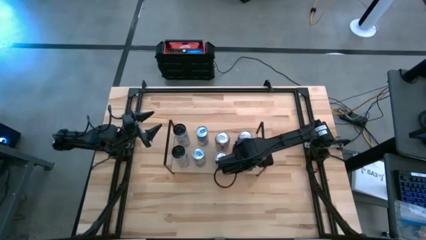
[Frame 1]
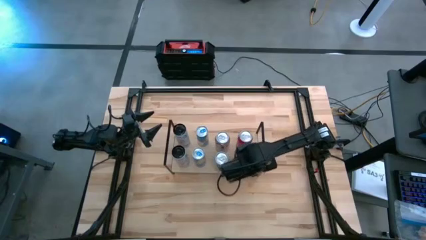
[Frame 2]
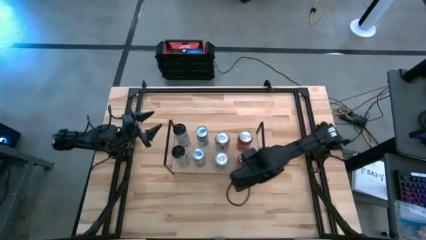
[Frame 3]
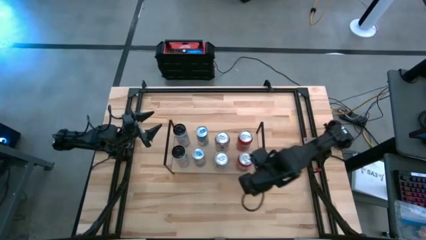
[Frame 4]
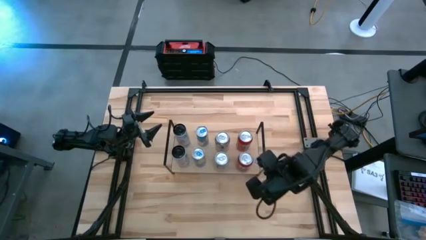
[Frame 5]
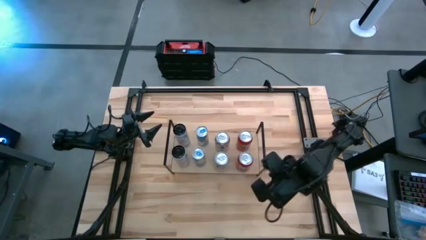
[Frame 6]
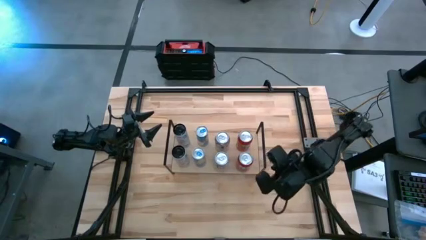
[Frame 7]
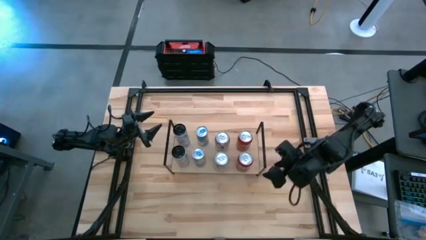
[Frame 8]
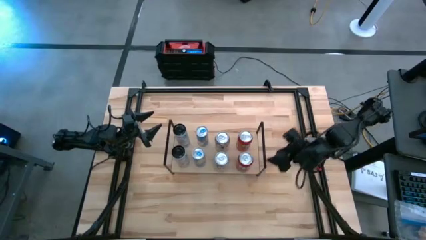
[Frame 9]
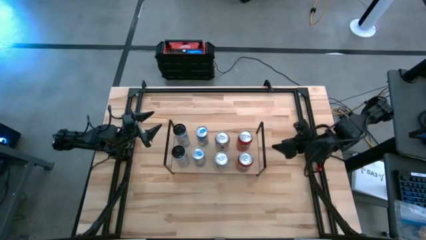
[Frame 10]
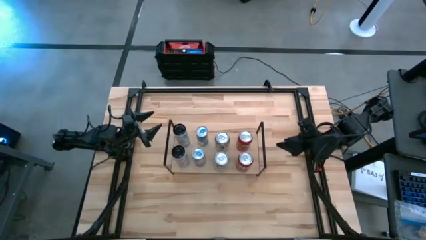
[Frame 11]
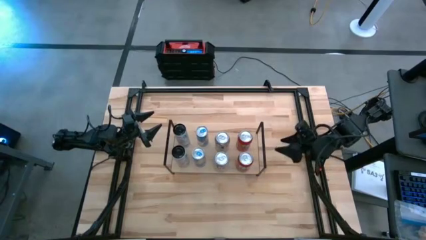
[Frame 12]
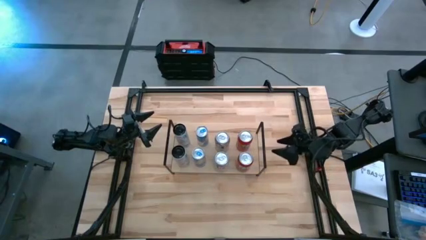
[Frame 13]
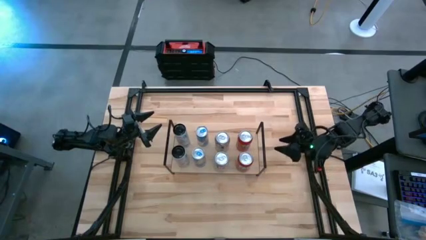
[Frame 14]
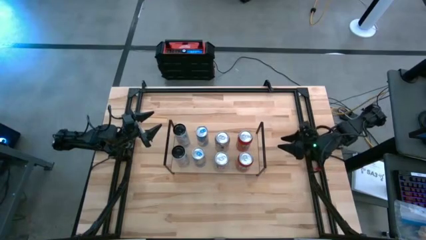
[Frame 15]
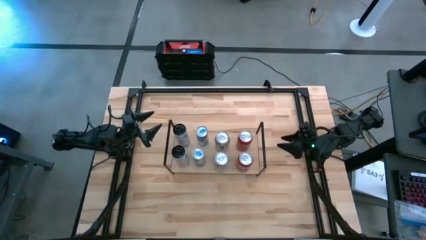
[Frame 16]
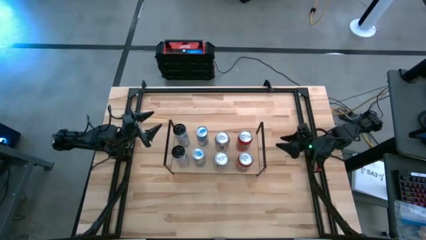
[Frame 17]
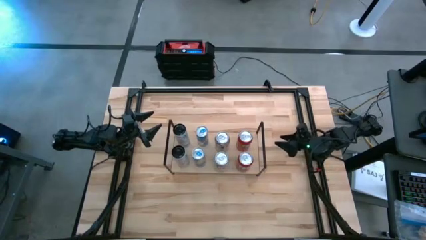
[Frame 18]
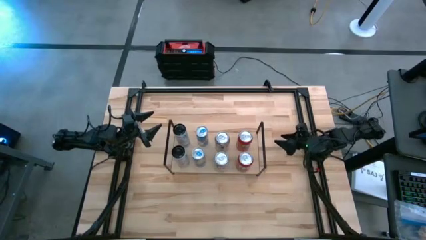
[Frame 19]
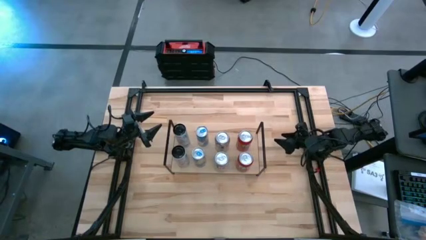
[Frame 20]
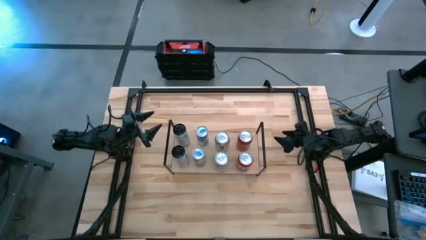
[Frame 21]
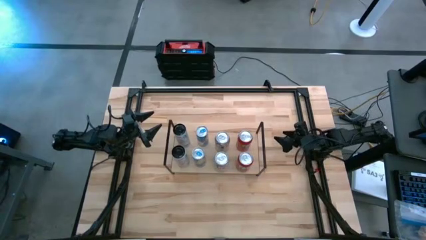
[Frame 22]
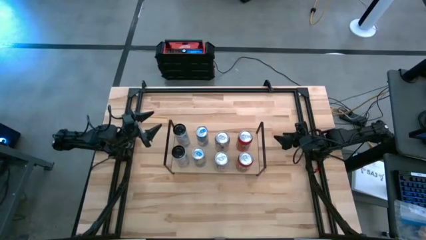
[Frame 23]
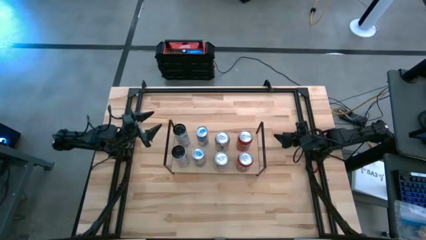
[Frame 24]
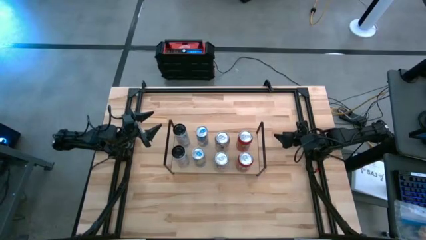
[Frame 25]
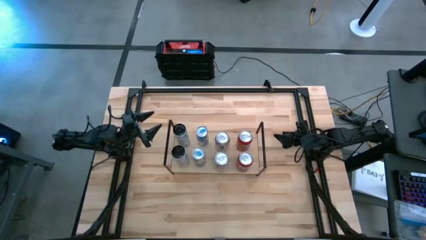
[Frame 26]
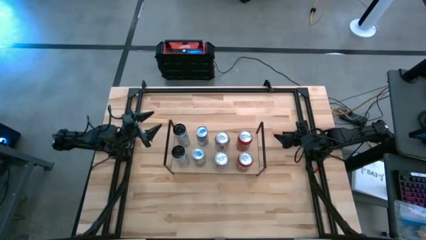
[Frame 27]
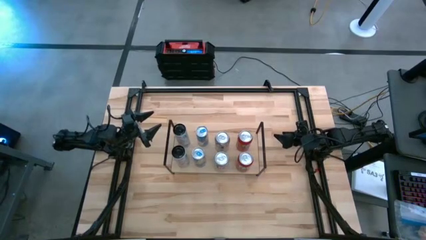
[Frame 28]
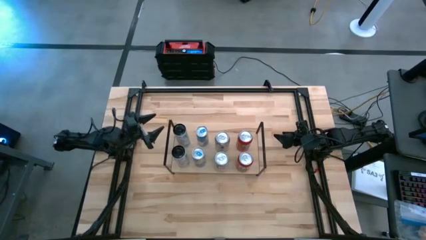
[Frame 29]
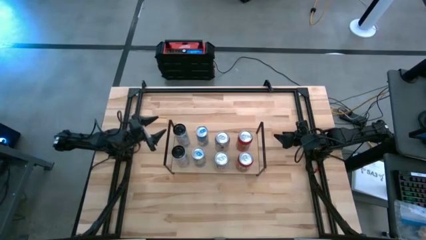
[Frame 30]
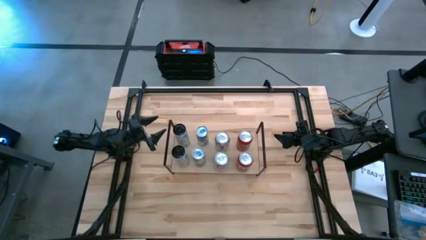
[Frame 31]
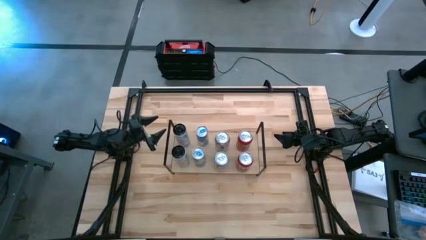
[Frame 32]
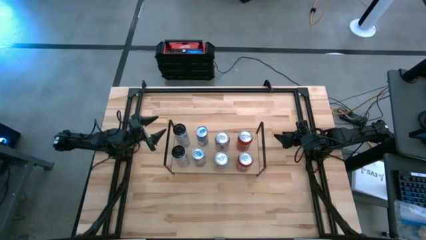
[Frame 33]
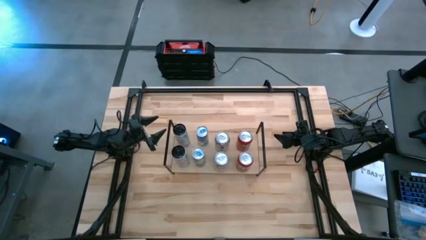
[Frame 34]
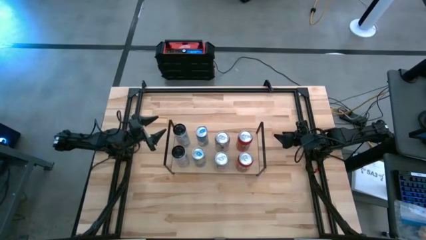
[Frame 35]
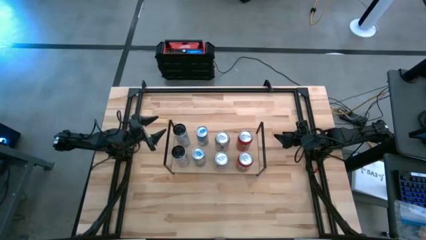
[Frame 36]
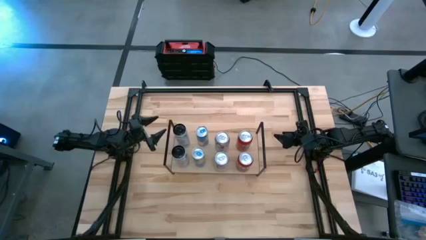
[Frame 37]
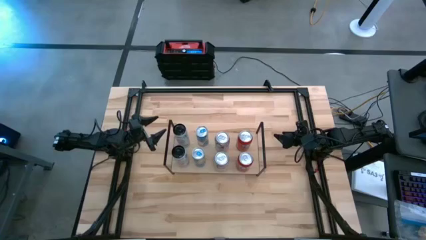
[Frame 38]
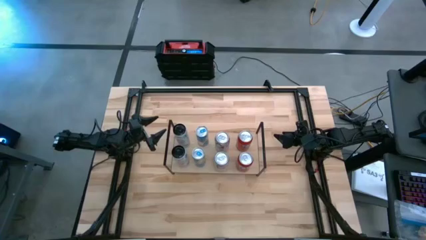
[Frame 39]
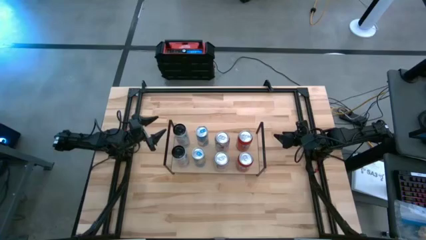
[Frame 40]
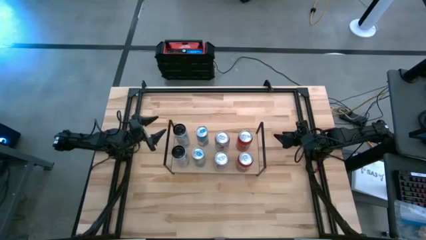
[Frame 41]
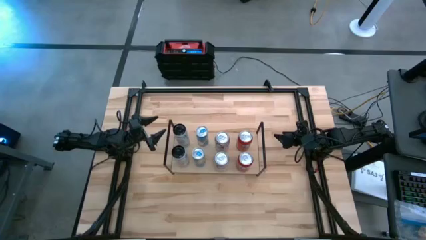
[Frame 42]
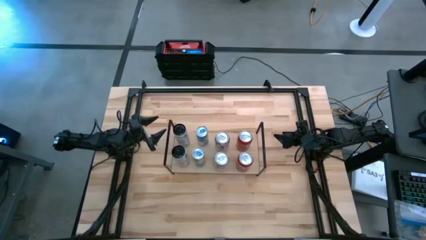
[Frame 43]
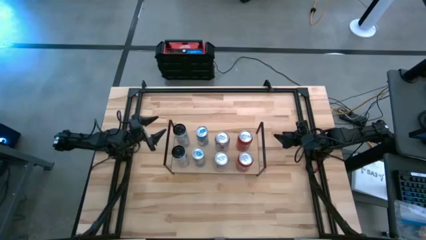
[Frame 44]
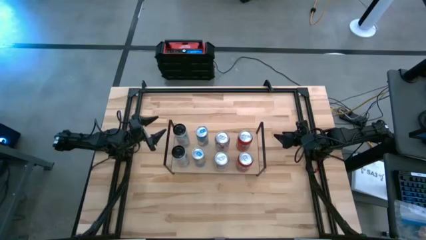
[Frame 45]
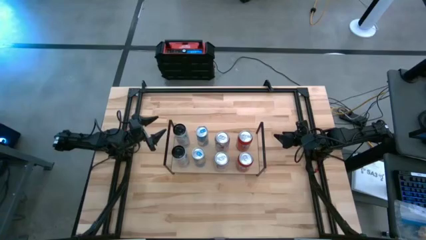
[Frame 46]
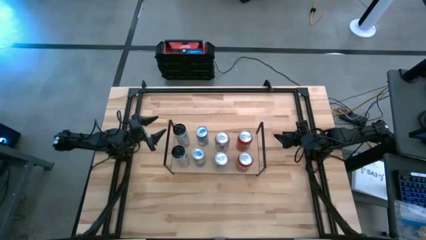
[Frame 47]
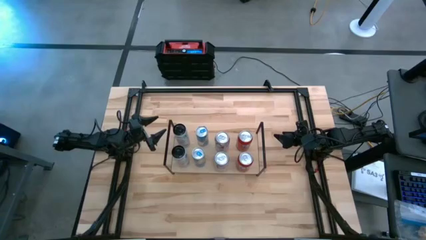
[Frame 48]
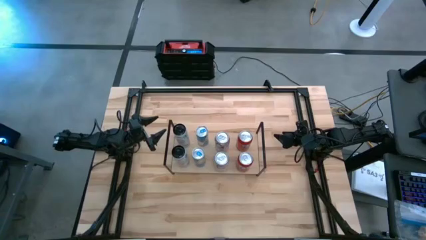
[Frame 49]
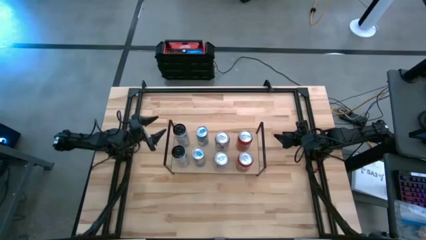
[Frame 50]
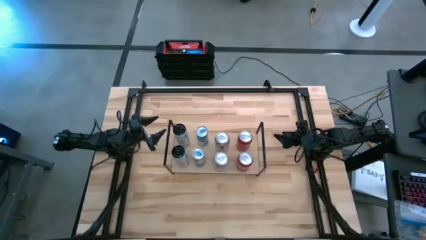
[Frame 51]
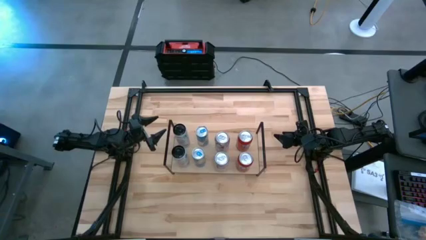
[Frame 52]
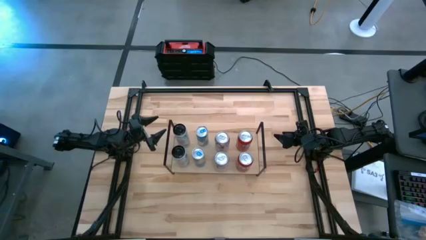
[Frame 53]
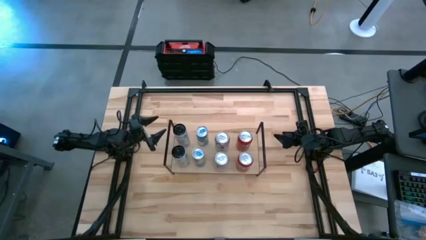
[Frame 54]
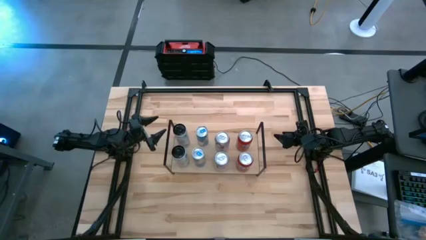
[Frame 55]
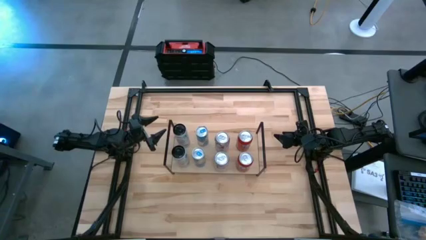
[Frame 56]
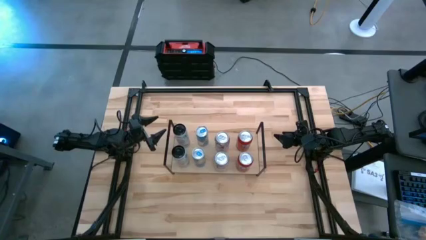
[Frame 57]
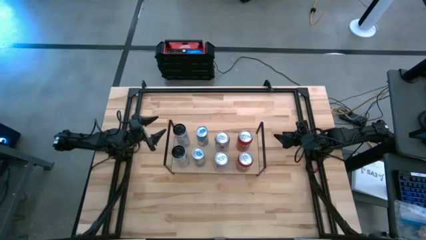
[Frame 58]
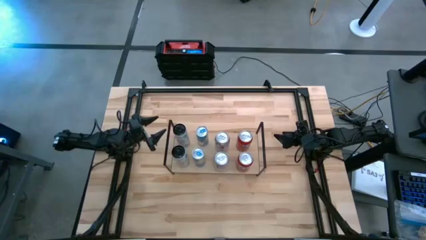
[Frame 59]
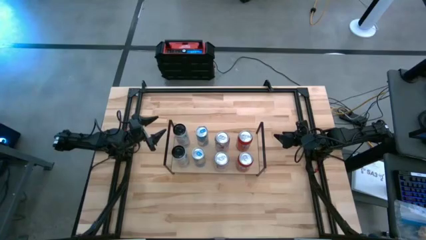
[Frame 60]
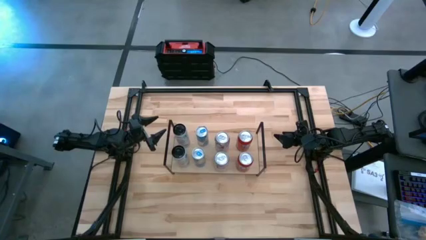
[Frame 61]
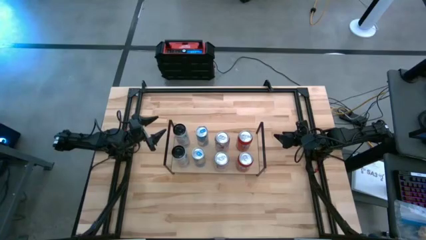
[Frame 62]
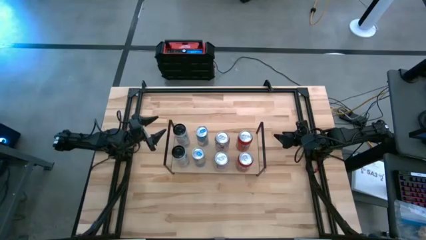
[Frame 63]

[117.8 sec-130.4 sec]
Task: Place canned beverage on shelf
Return to Home Position

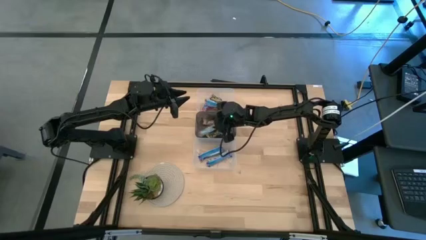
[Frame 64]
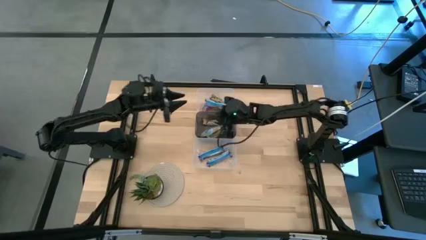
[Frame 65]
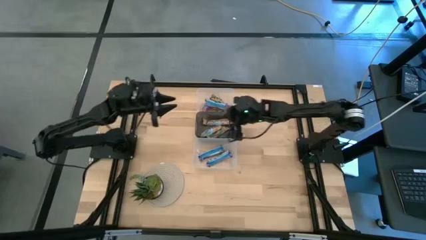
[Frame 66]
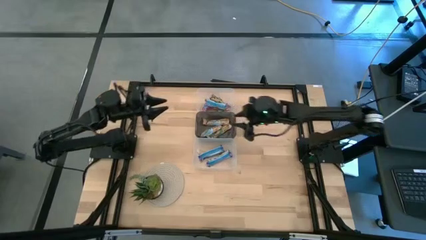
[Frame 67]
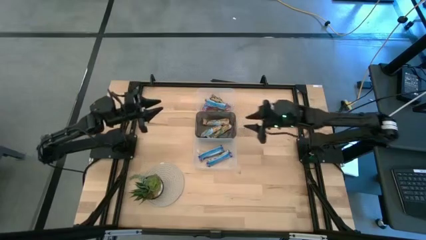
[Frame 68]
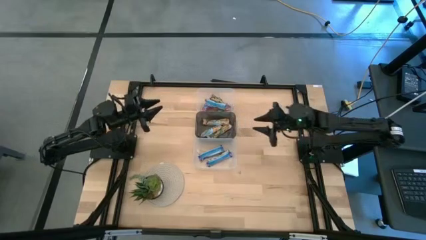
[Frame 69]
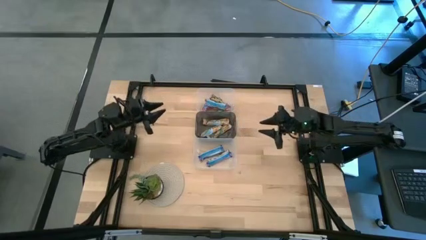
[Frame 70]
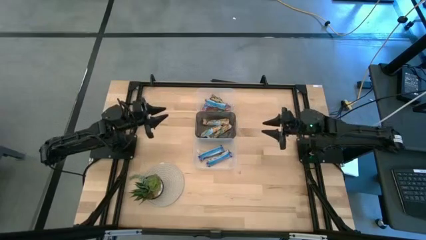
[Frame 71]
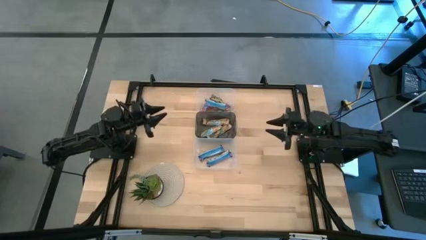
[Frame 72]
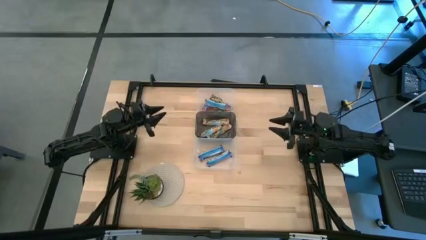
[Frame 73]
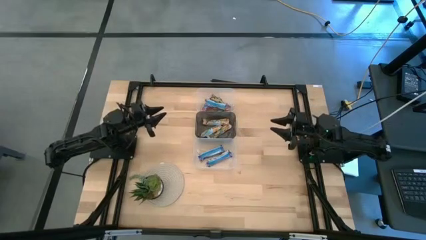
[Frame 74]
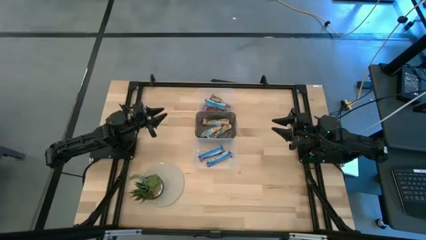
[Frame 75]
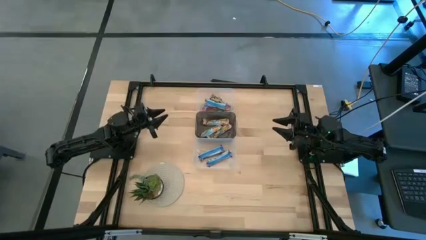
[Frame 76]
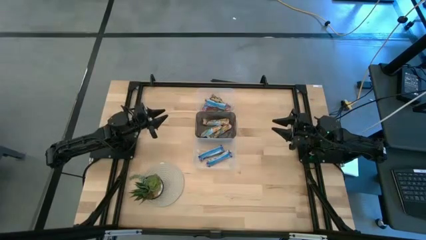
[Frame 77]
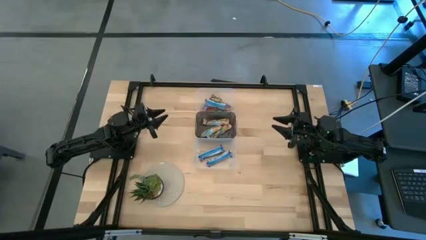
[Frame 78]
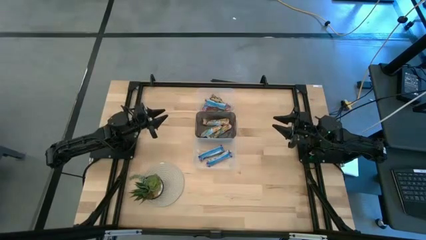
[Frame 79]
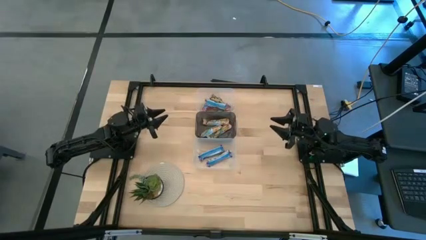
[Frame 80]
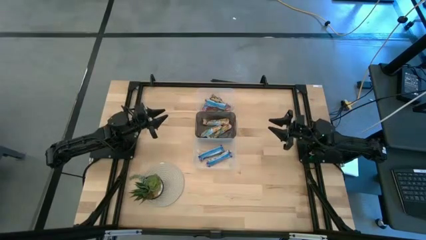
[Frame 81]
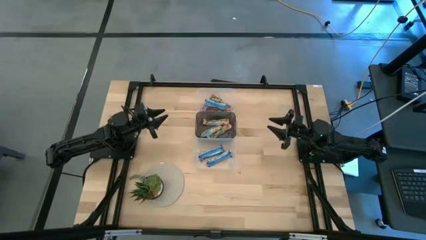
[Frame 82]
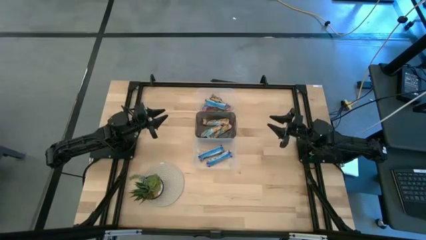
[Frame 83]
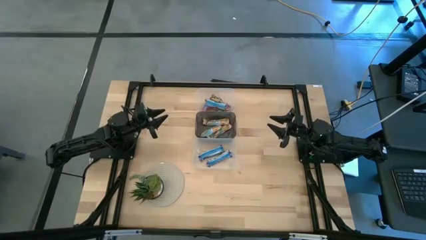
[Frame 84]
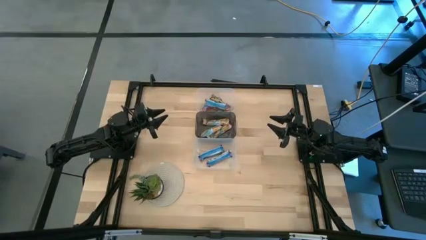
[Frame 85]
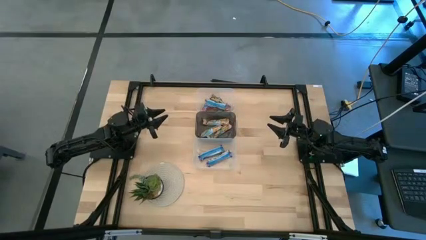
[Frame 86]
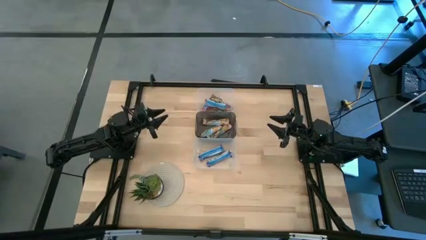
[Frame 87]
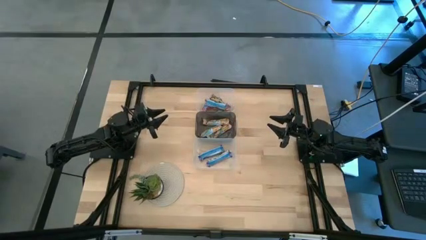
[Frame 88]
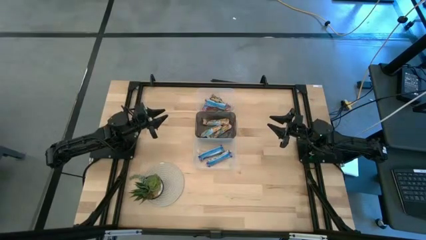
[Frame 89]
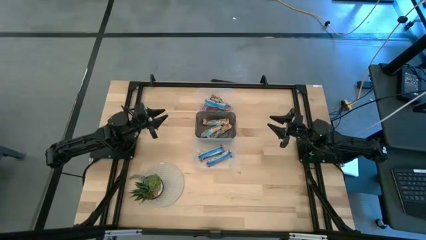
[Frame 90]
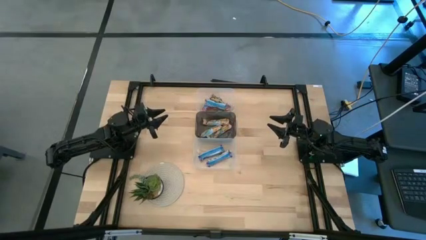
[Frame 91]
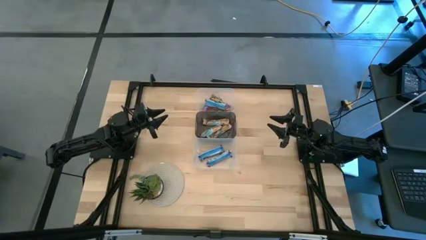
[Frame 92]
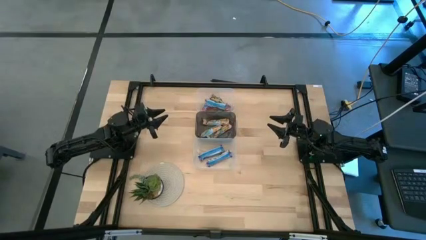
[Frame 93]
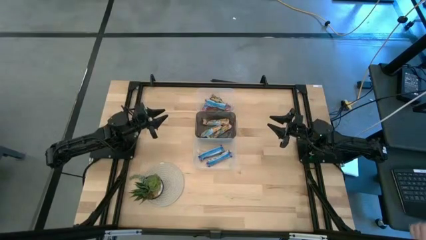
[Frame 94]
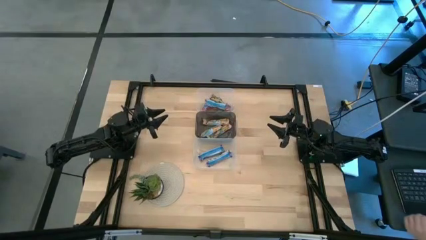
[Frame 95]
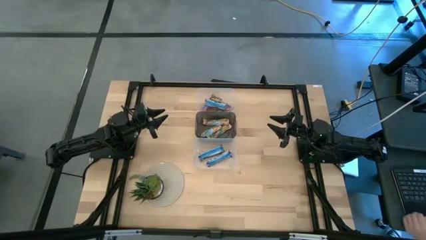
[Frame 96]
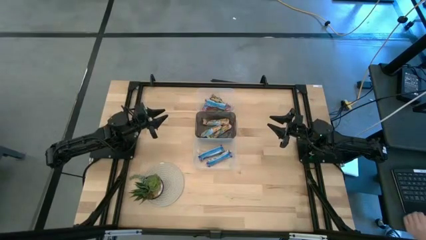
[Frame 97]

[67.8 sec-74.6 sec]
Task: Pick and place Granola Bars by type
Return to Home Position
